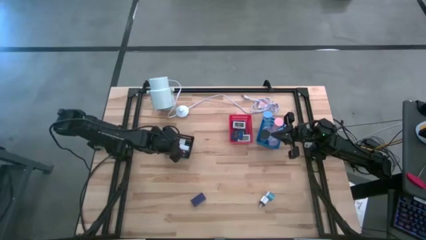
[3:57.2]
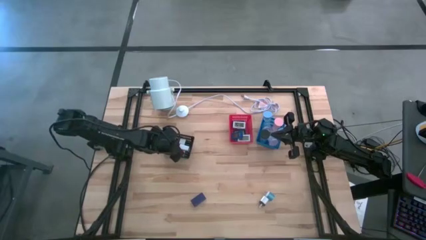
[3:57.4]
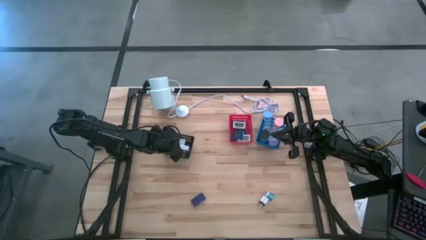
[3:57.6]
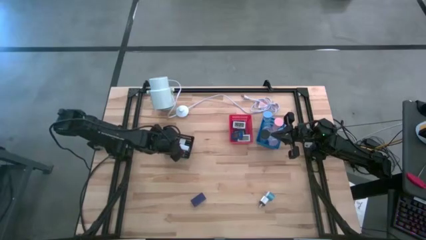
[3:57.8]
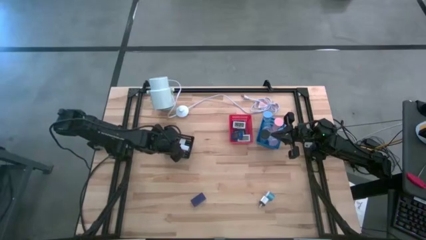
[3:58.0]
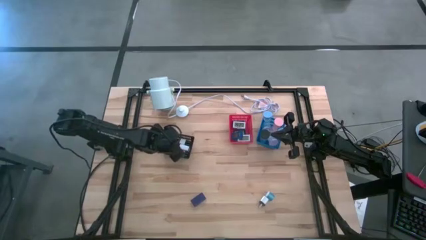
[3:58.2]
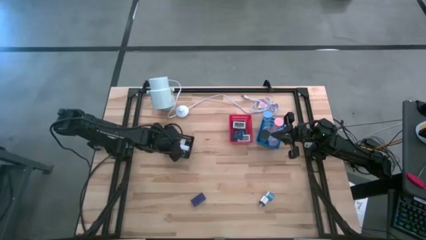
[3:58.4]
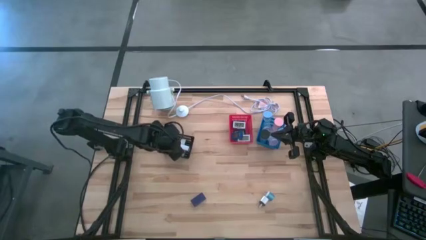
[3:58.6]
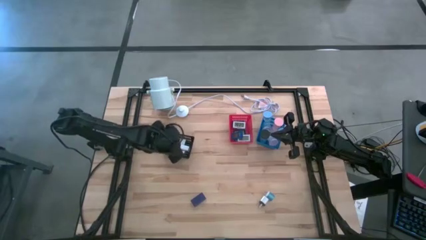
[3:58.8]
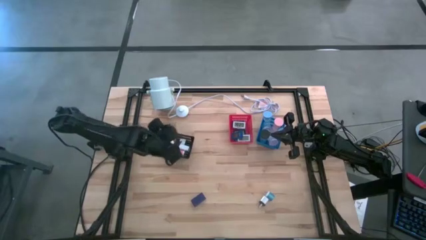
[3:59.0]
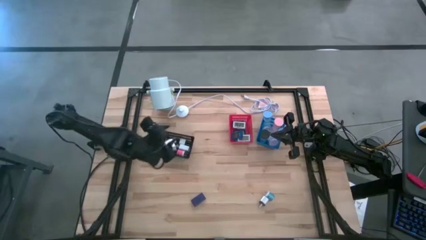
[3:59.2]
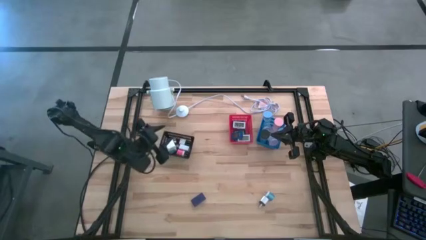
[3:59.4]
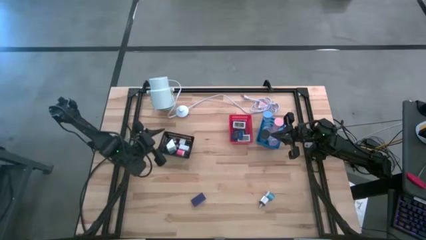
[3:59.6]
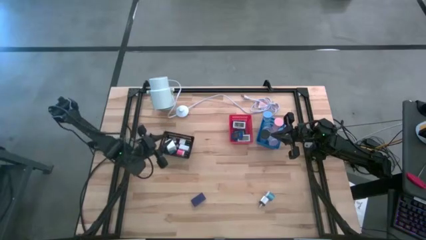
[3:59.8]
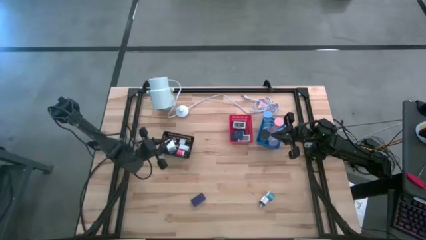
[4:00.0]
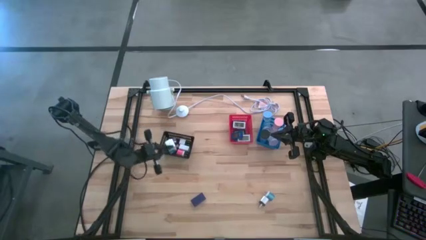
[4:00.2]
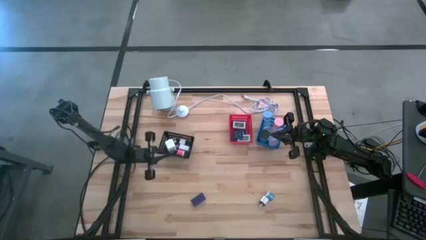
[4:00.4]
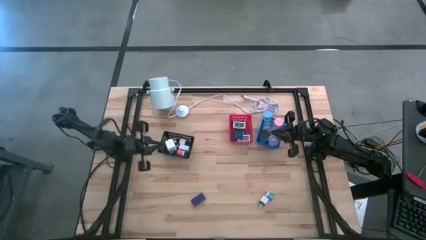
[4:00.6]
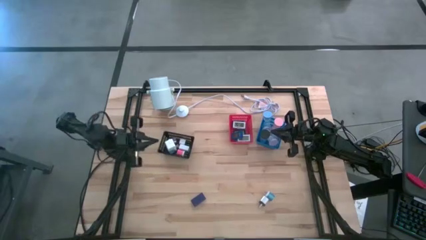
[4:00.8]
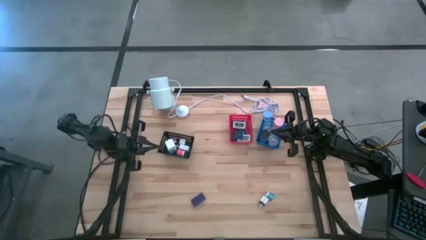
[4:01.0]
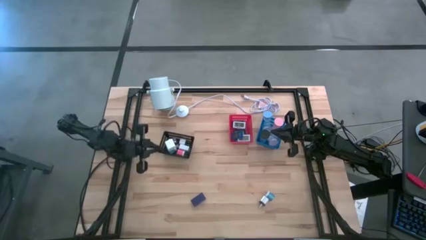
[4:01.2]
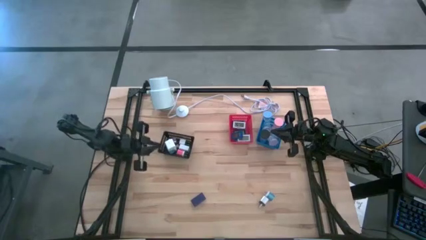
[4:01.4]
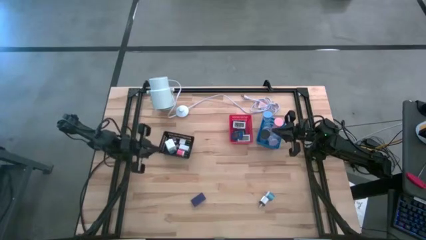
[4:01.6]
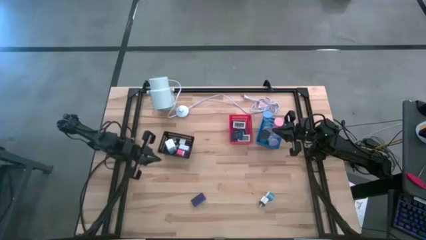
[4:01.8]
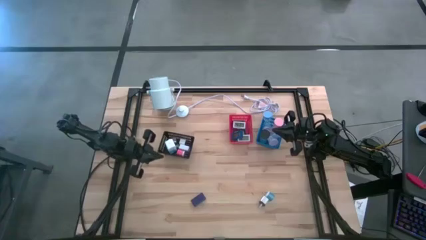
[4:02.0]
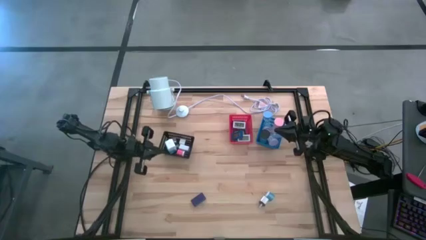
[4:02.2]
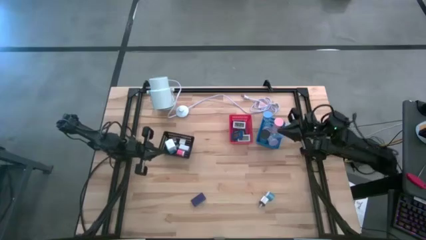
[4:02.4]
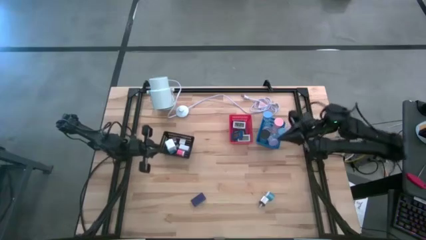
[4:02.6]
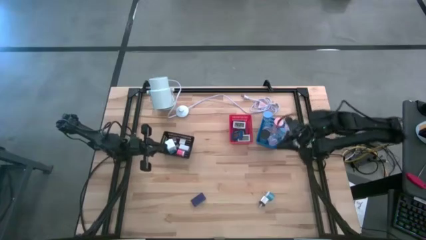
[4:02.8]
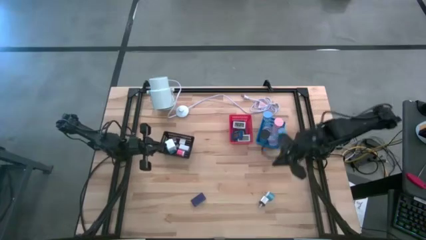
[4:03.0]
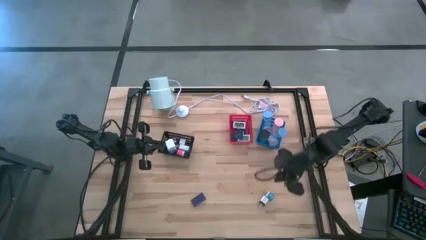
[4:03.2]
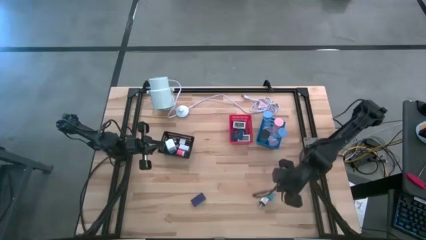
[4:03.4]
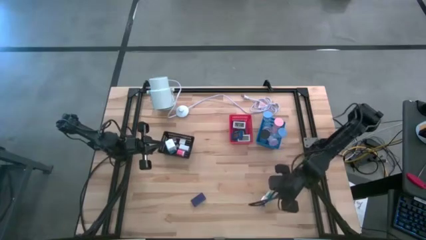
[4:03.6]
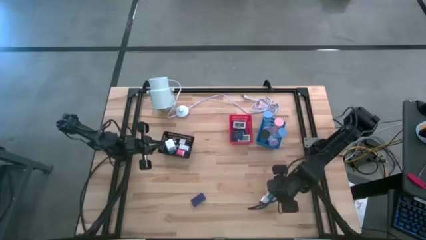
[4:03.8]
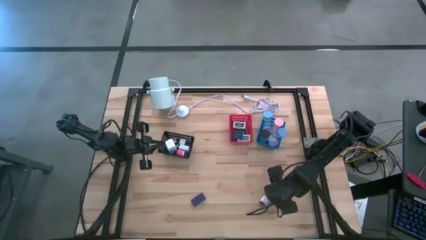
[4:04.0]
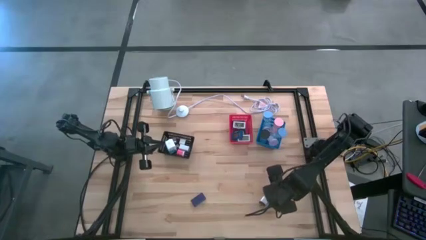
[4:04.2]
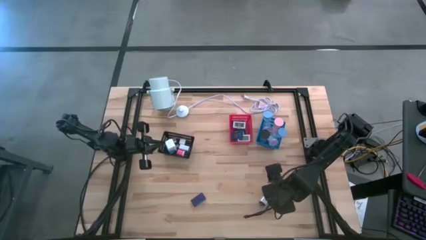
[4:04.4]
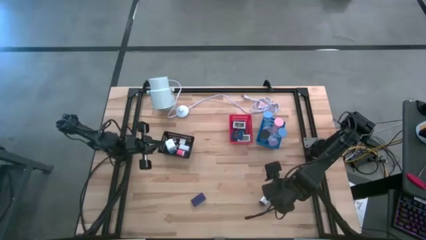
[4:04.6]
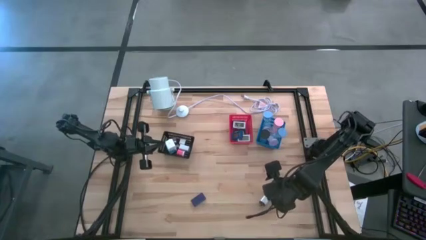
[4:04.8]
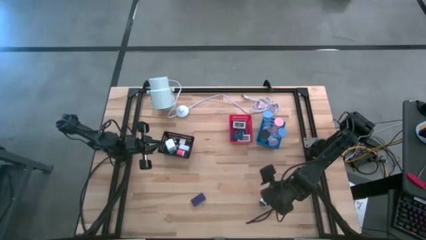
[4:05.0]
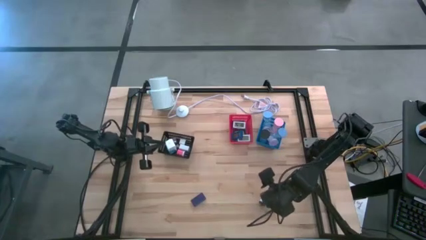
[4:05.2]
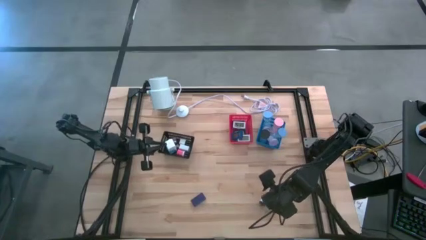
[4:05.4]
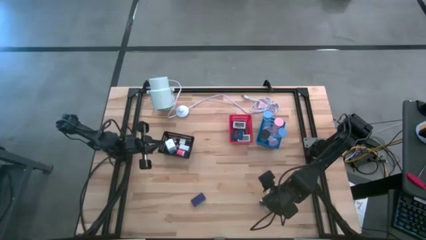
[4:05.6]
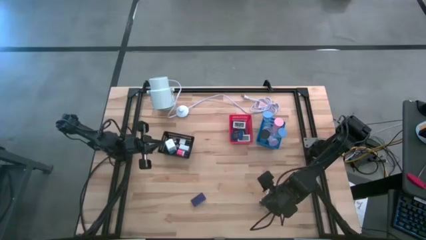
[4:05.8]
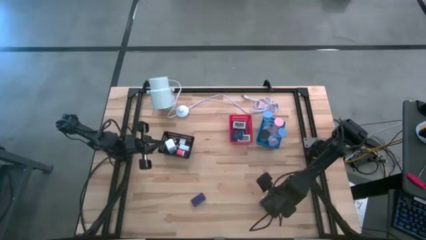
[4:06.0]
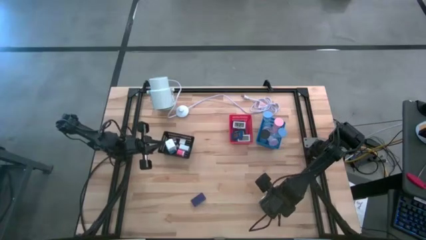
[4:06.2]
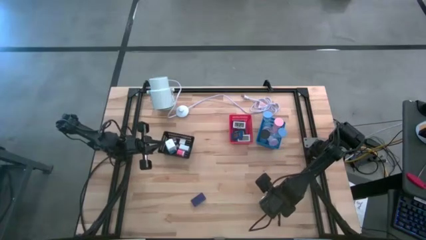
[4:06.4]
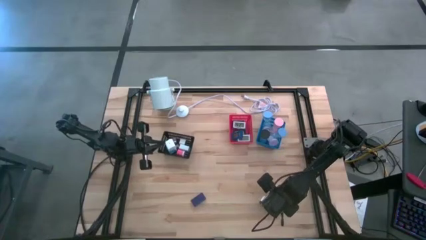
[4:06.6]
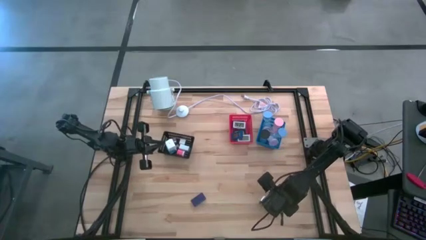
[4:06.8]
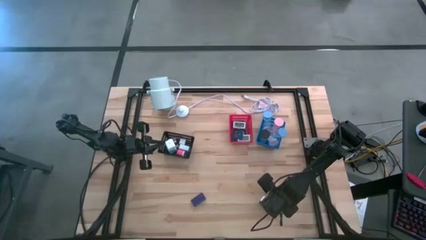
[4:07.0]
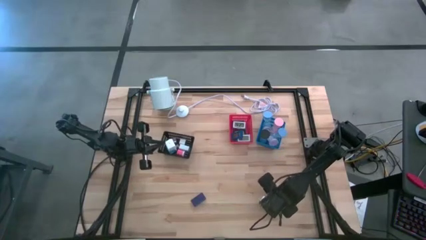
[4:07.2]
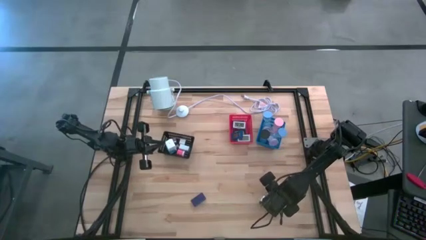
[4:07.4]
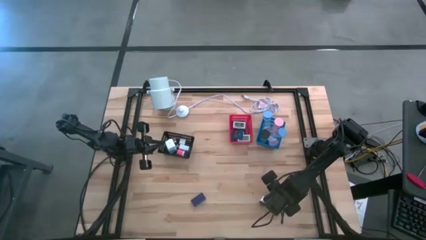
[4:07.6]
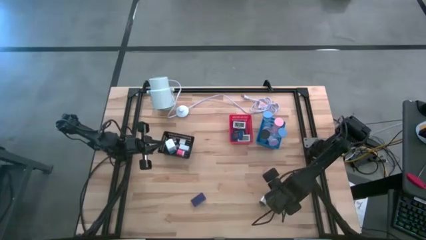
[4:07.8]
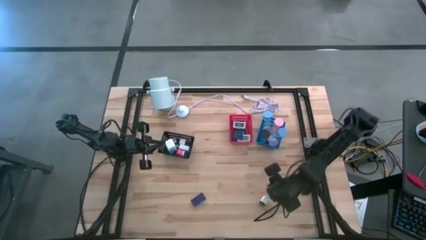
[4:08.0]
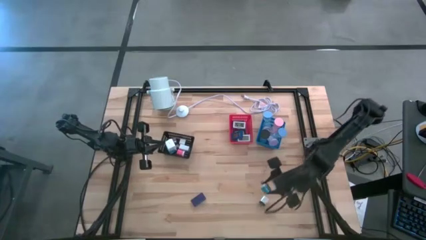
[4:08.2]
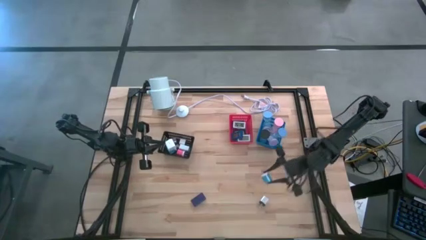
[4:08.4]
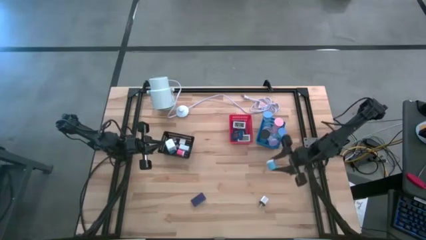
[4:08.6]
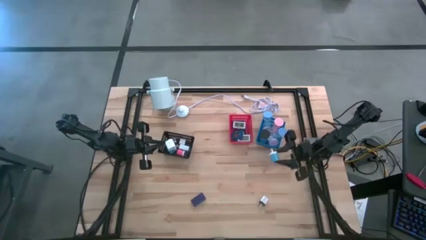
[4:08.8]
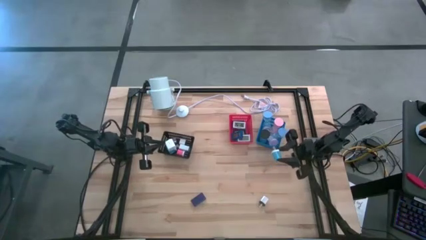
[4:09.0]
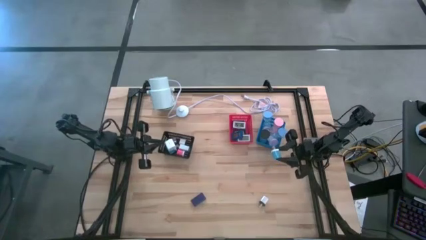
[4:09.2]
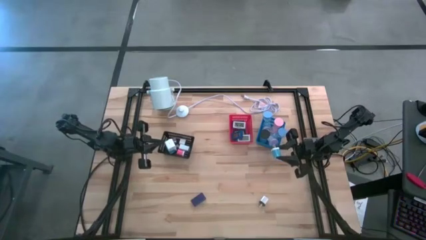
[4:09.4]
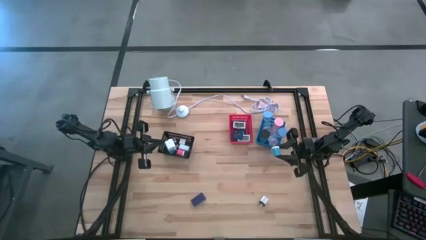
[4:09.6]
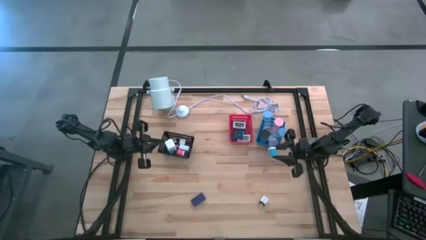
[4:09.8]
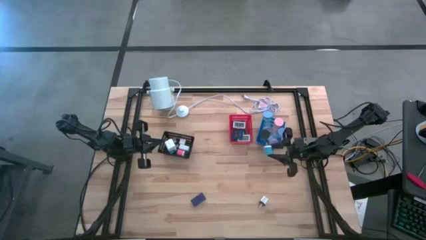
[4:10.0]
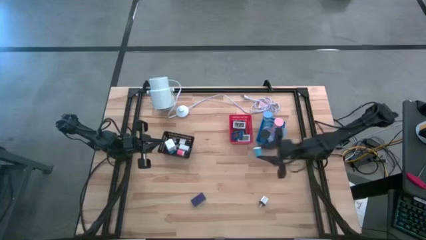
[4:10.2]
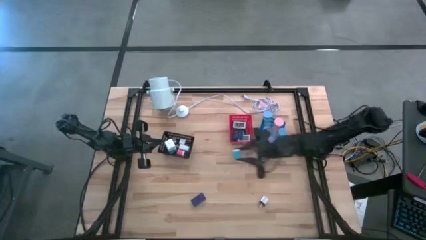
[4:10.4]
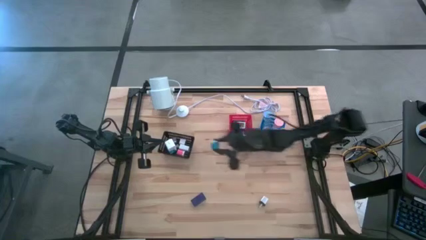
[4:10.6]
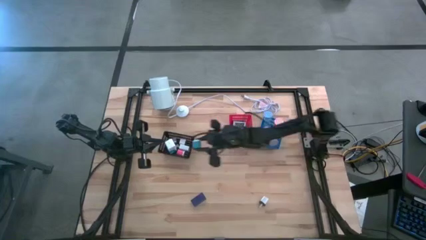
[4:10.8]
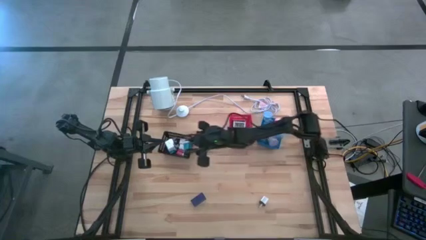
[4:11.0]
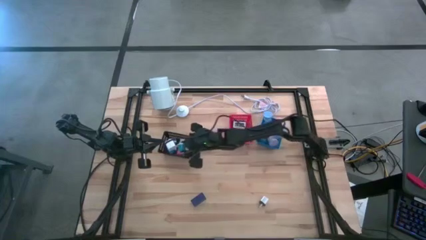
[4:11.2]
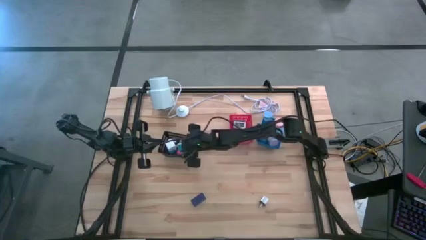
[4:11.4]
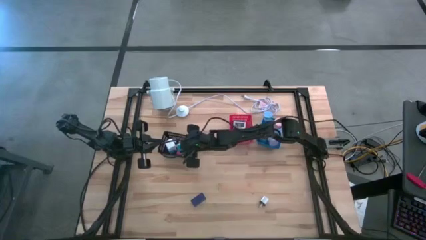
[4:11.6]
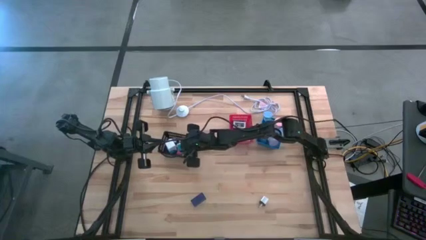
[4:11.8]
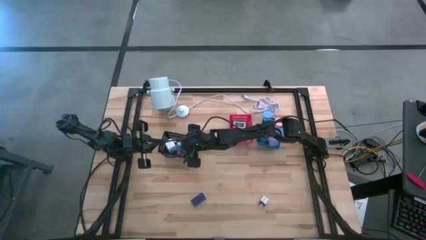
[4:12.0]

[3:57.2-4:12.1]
Task: Pick & Place Office items
Put the light blue digital clock into the black bin
